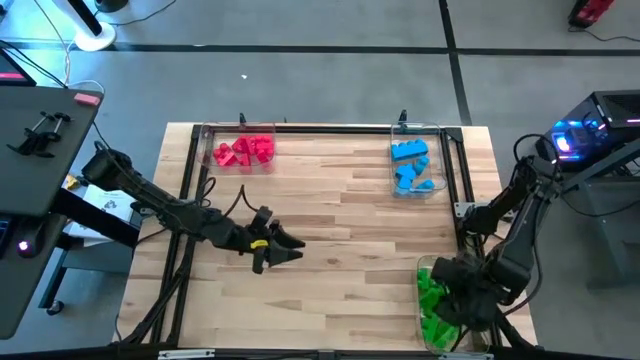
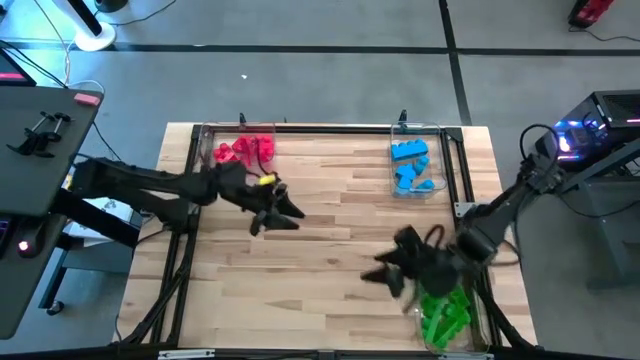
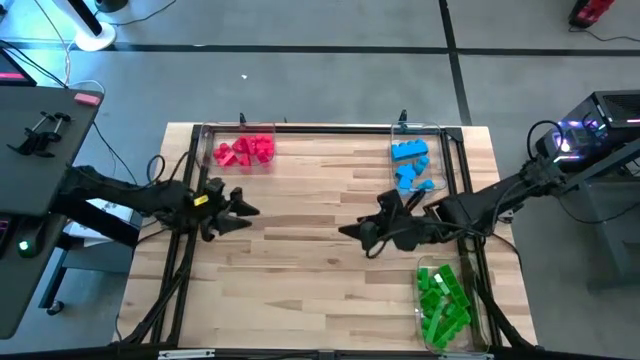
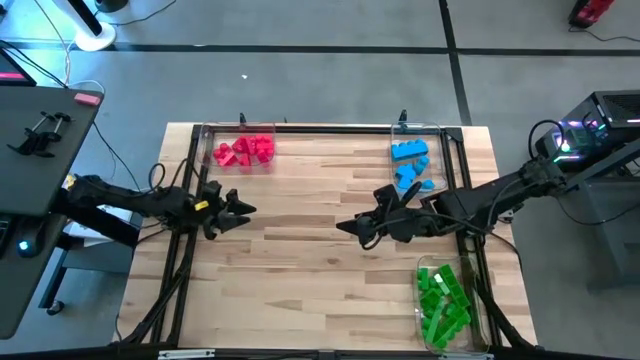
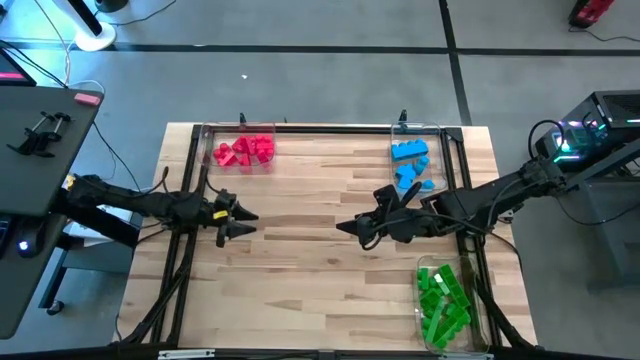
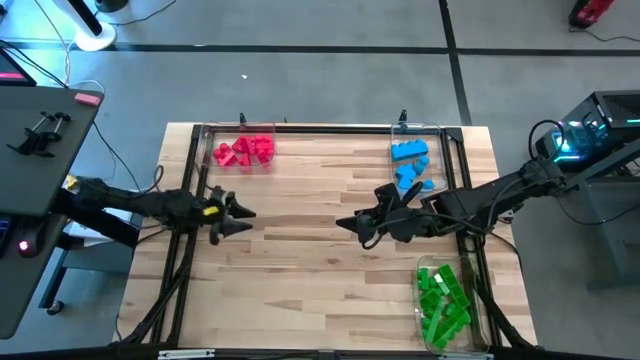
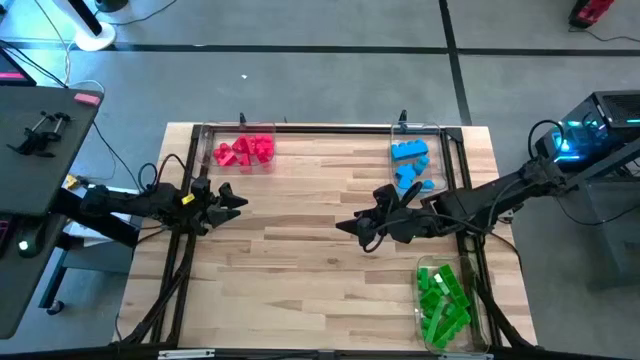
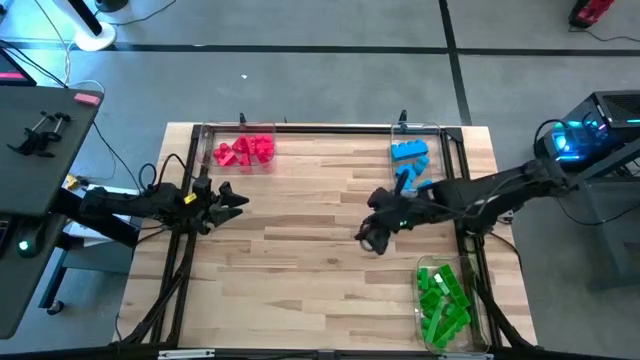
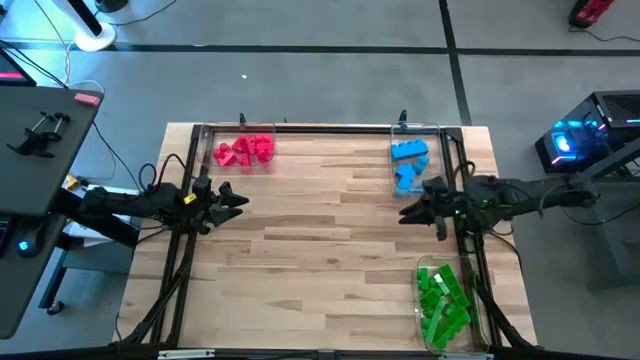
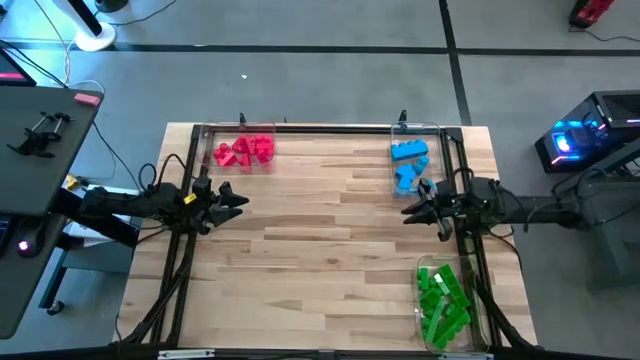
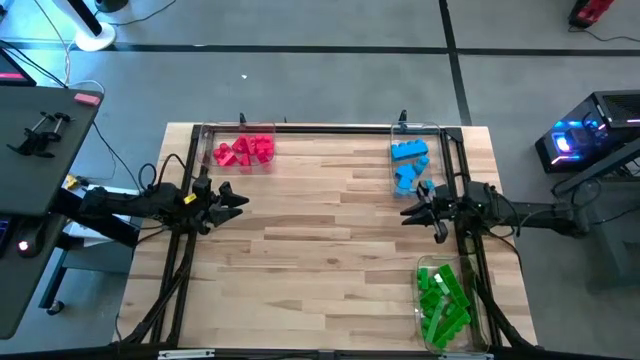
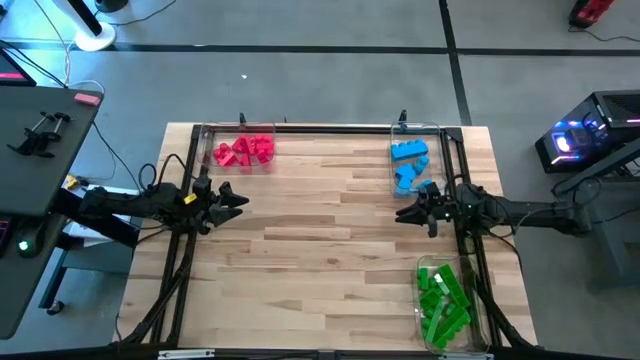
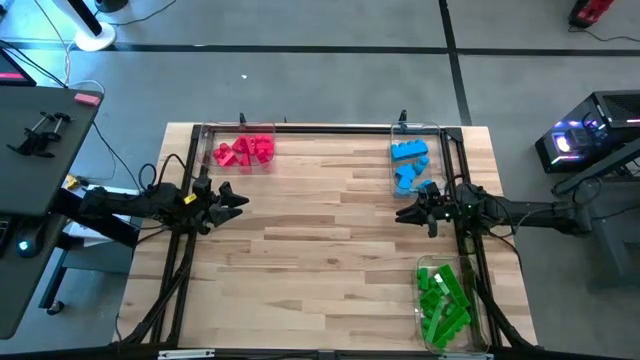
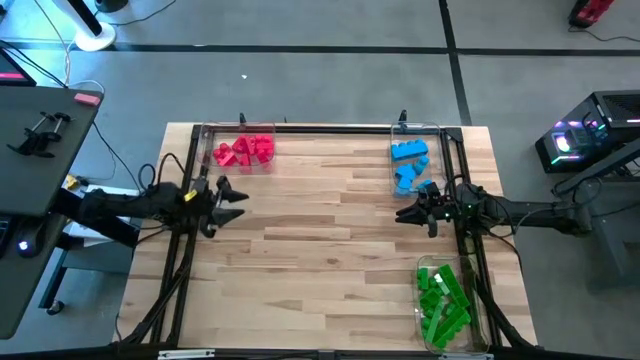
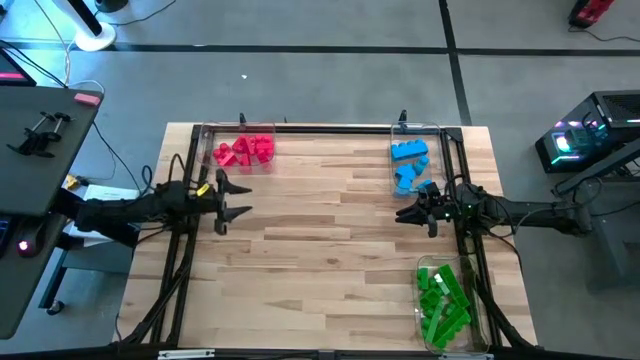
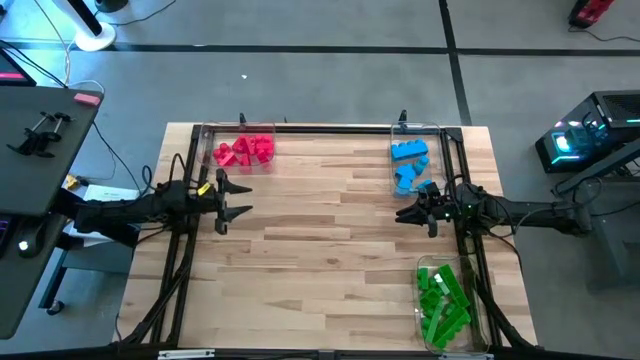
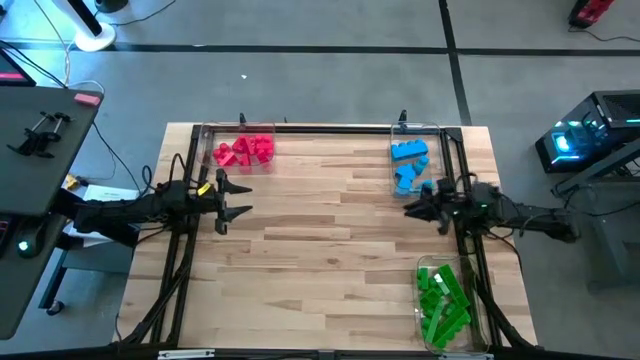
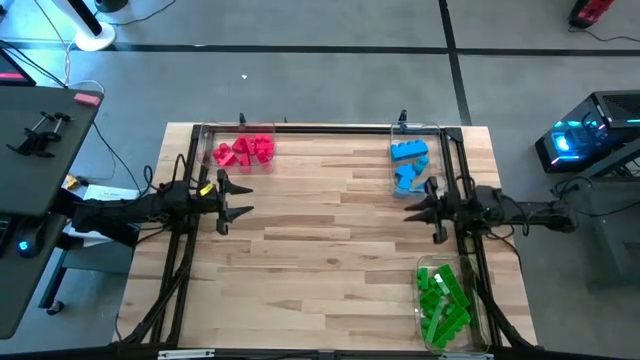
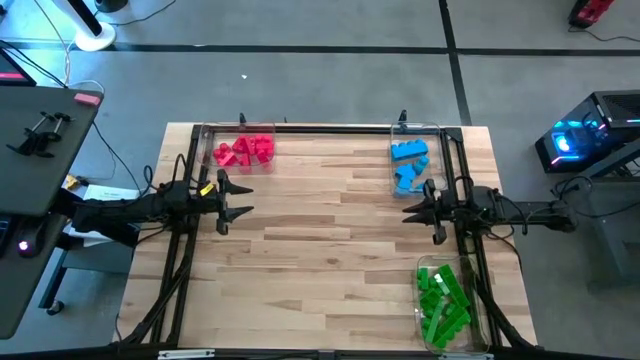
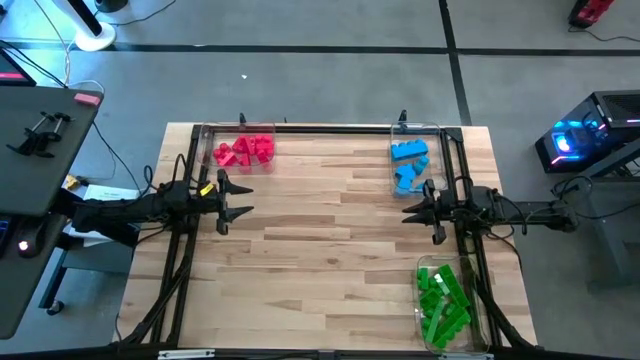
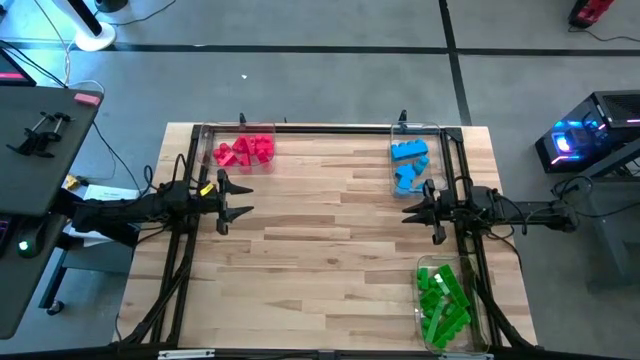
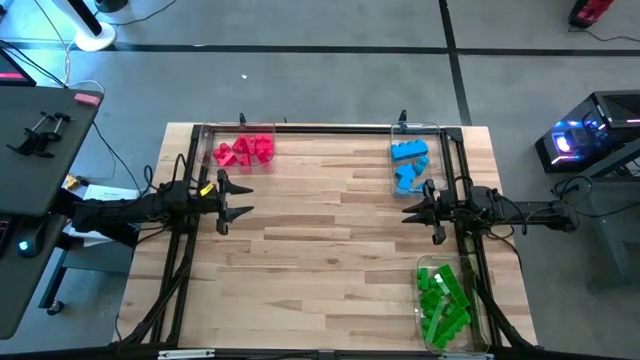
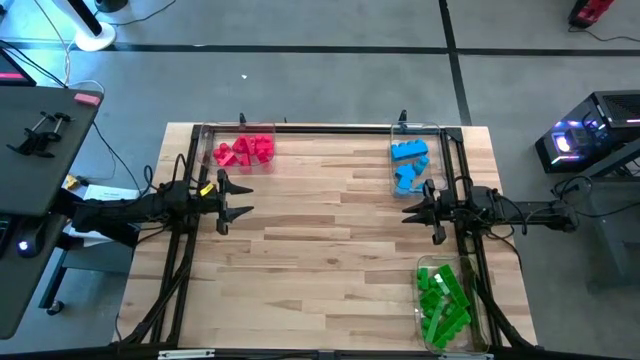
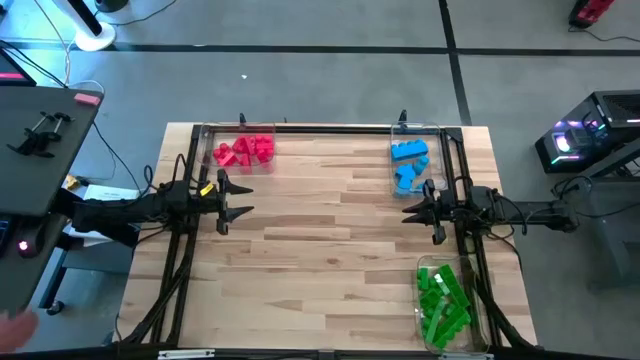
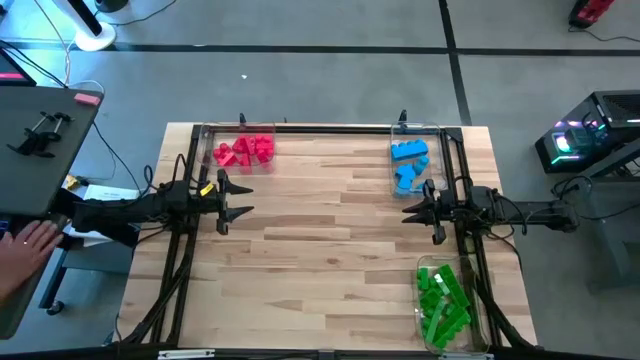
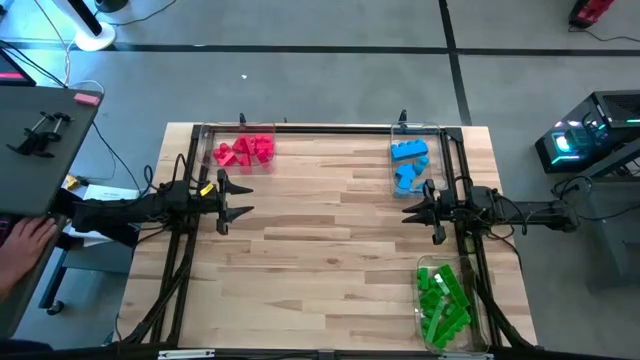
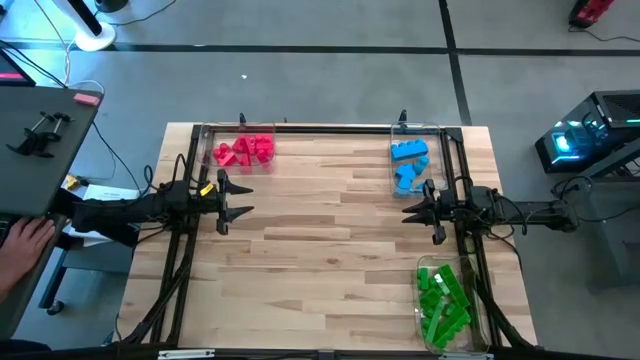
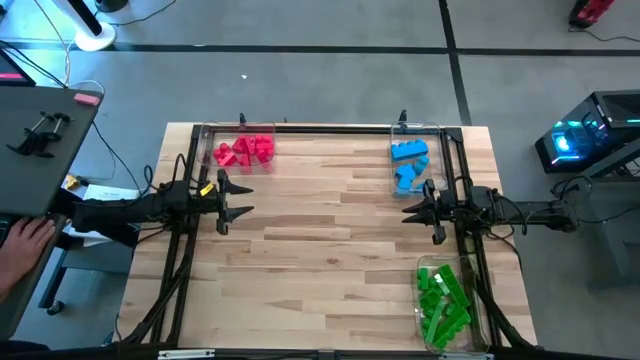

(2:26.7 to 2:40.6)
Task: Sort blocks
Return to Home Position

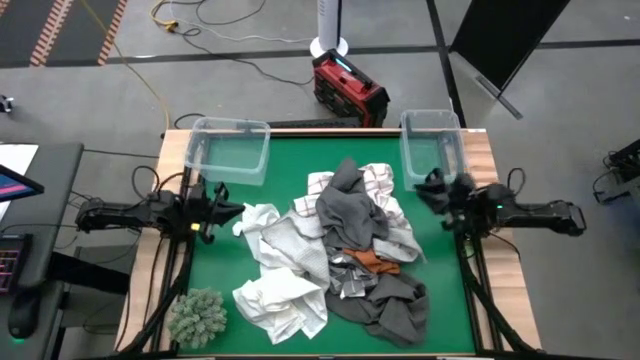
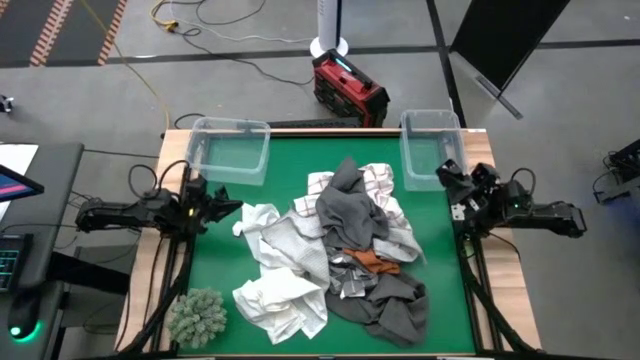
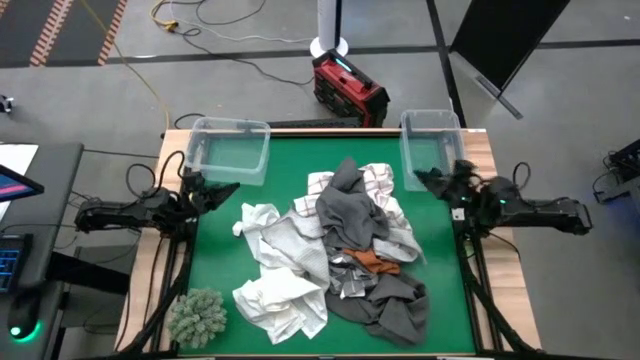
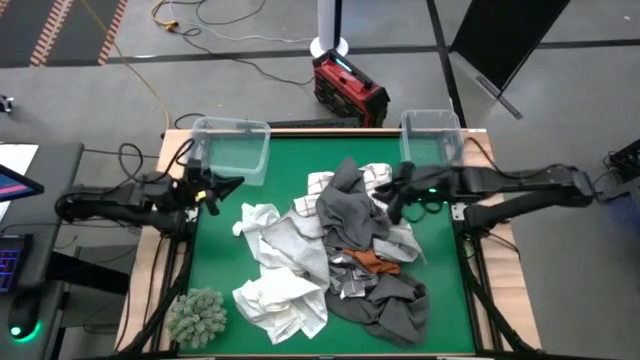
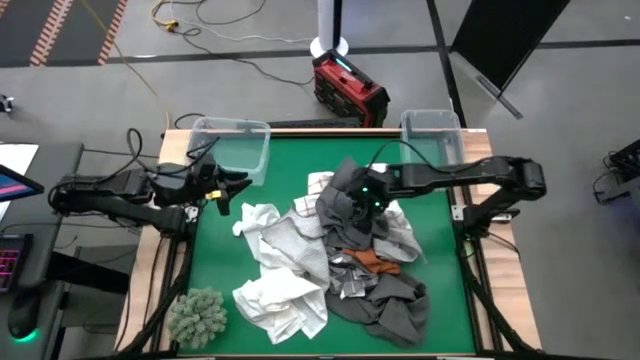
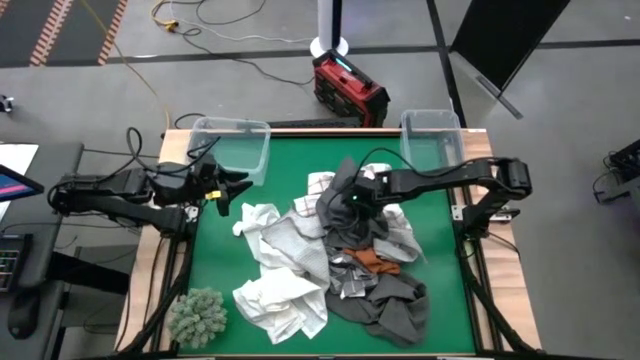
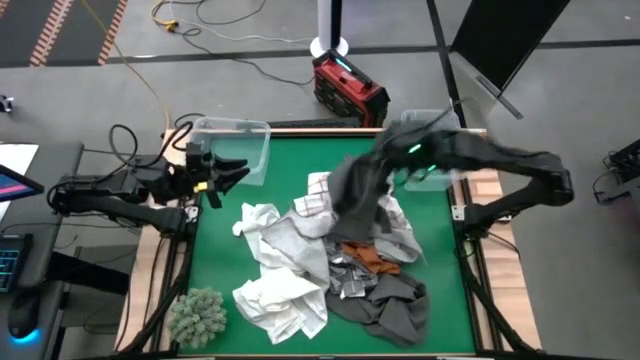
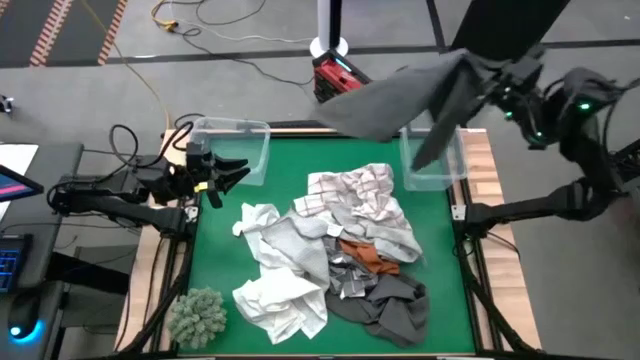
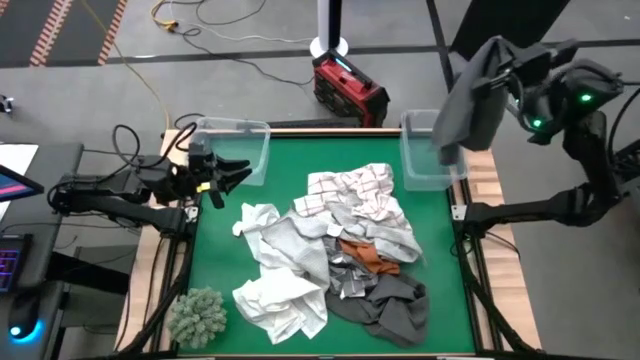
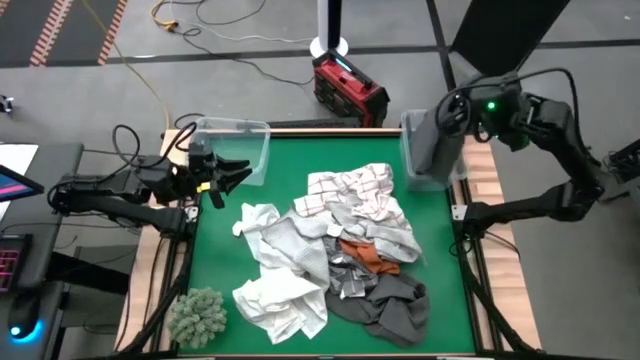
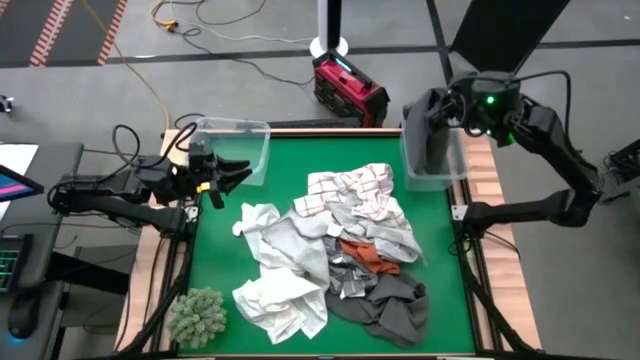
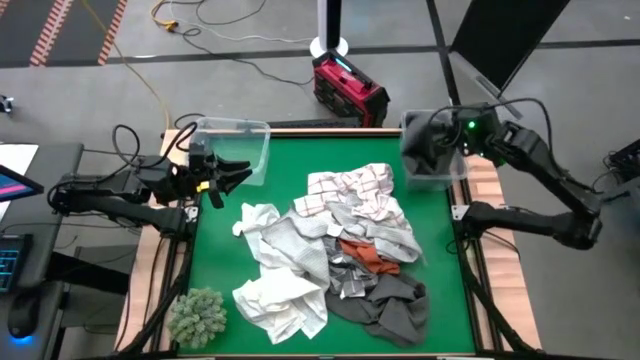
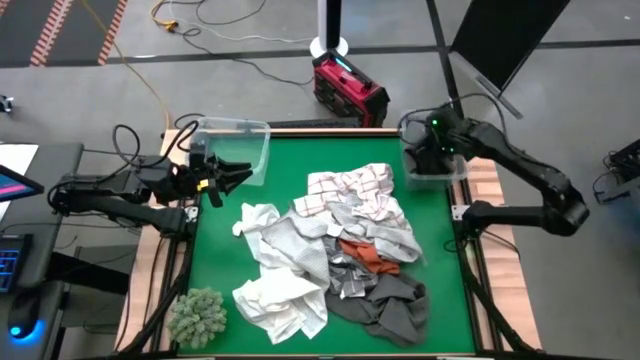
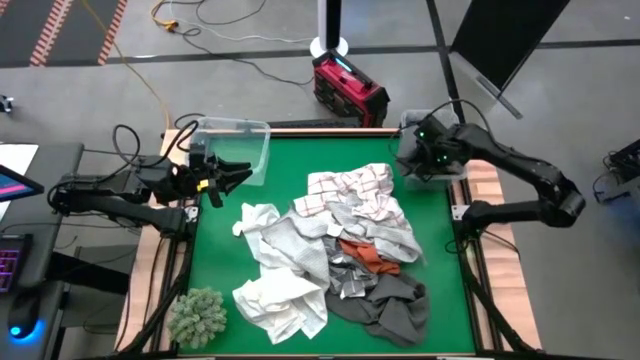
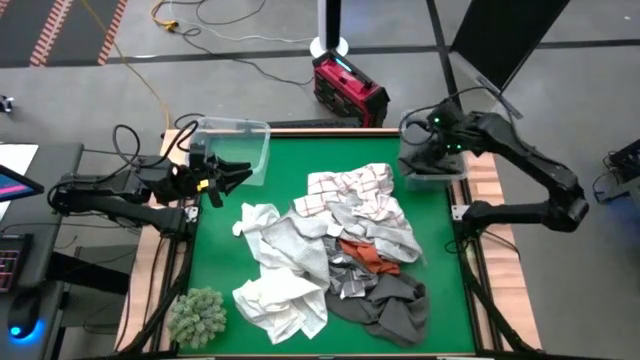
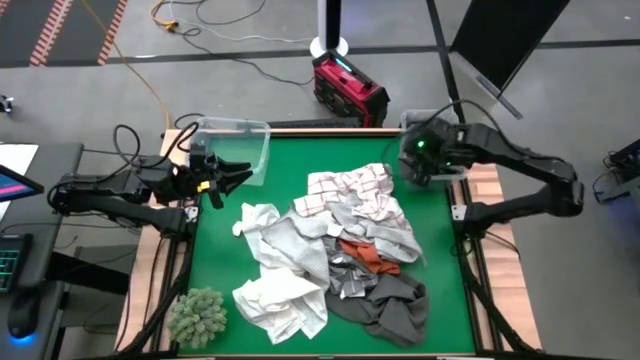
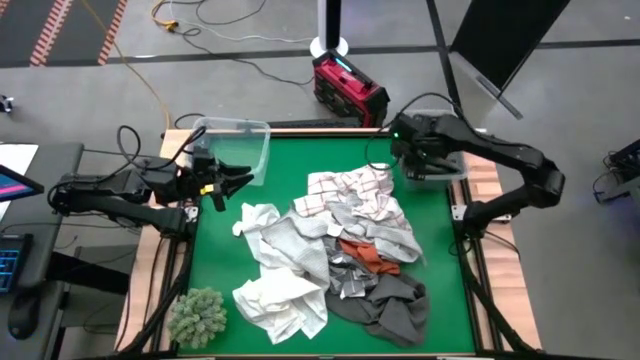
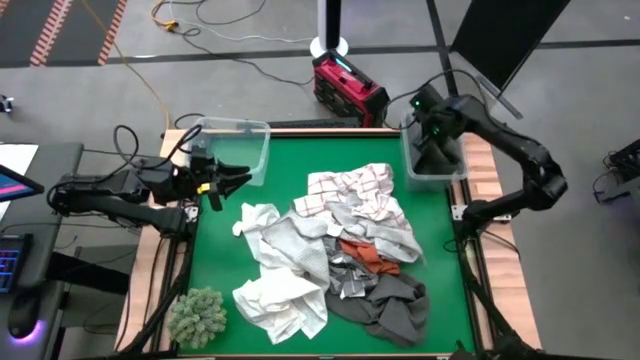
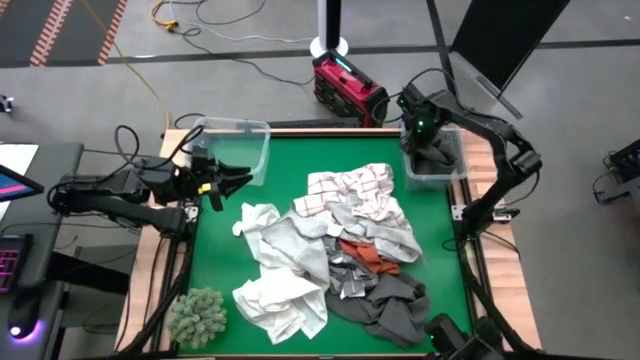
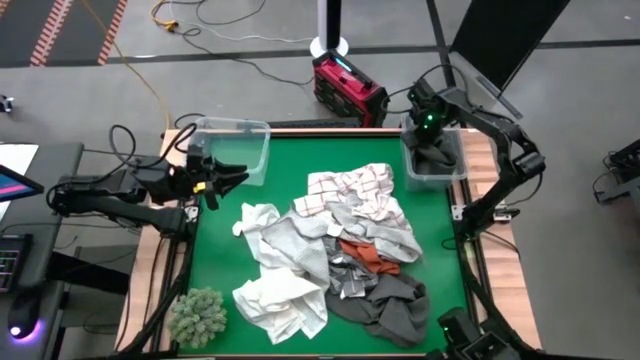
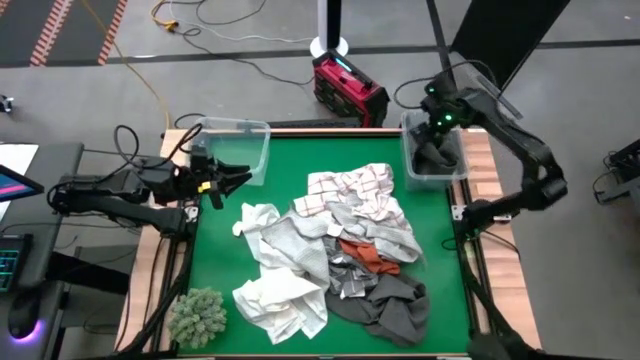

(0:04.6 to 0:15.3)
Task: Sort towels by color in basket
Put the dark gray towel into the right transparent bin
